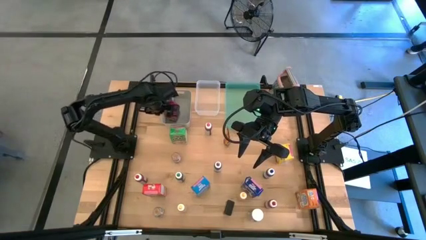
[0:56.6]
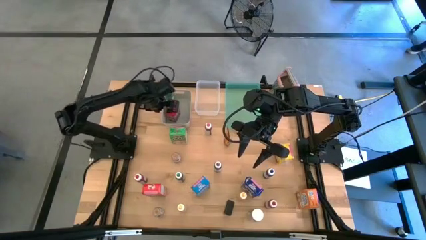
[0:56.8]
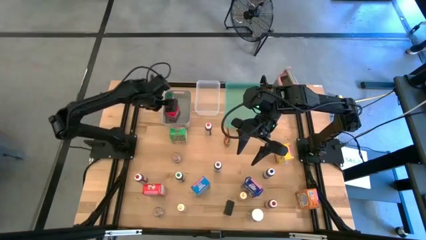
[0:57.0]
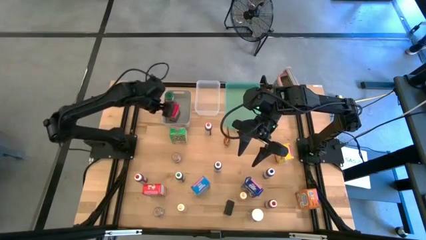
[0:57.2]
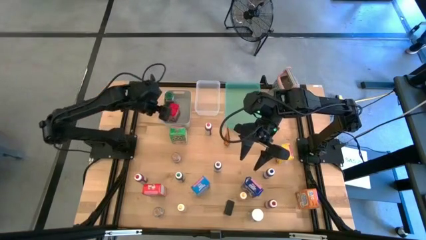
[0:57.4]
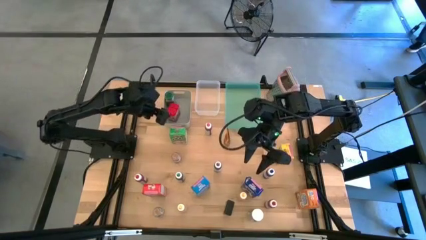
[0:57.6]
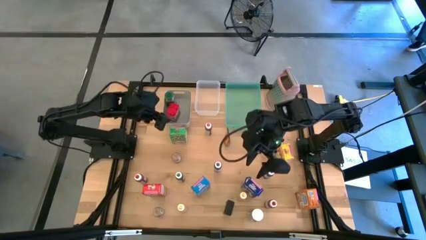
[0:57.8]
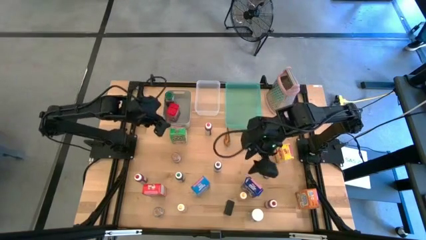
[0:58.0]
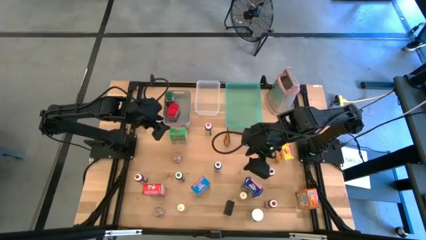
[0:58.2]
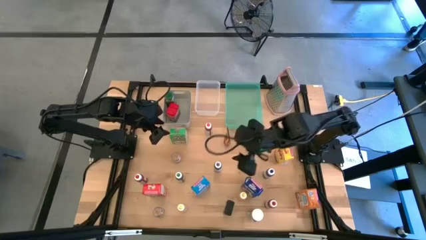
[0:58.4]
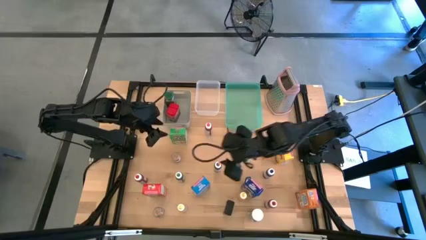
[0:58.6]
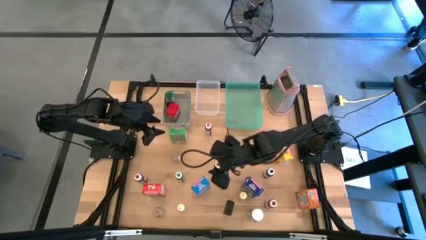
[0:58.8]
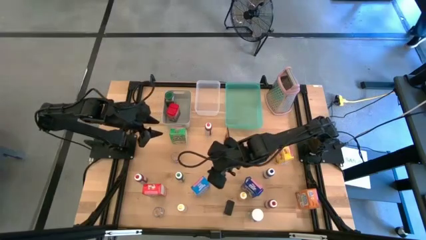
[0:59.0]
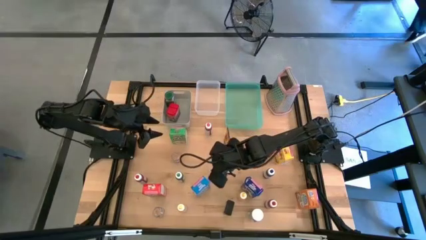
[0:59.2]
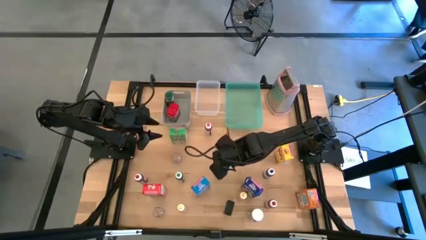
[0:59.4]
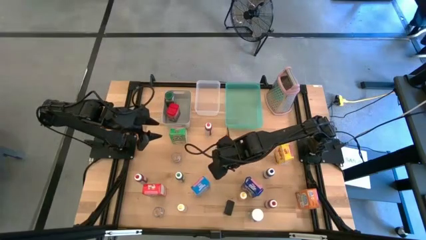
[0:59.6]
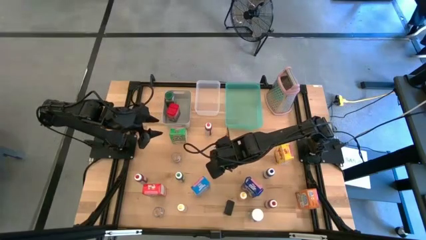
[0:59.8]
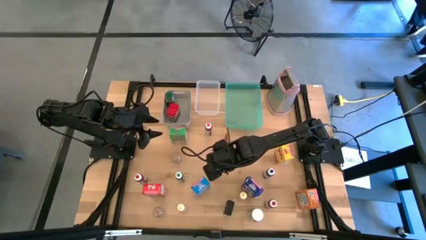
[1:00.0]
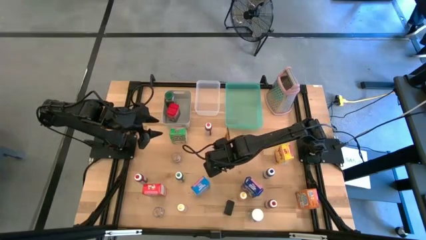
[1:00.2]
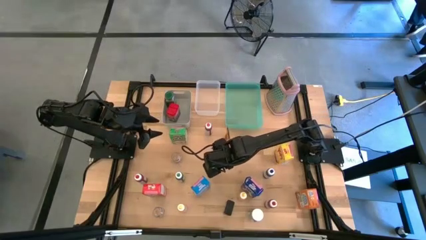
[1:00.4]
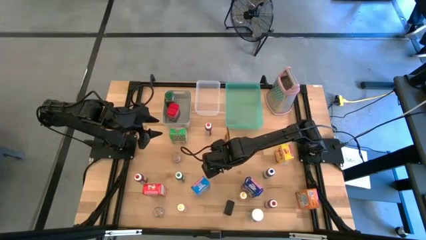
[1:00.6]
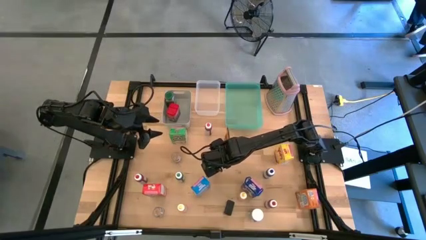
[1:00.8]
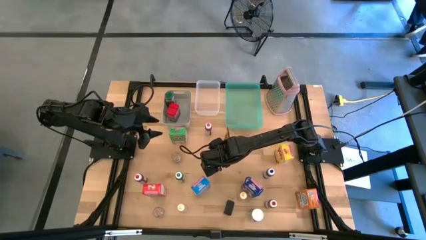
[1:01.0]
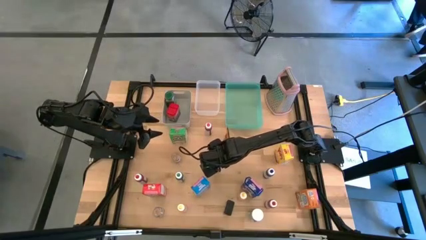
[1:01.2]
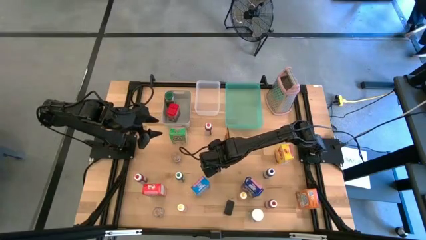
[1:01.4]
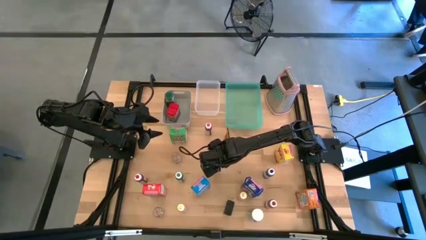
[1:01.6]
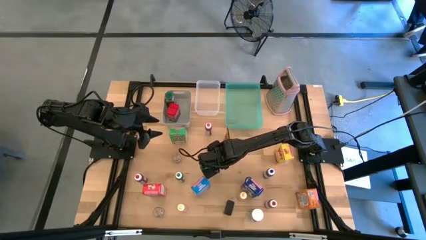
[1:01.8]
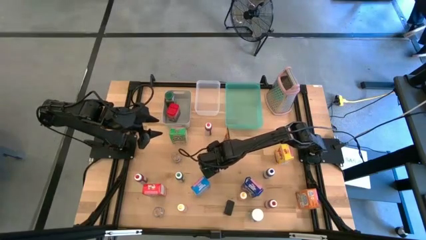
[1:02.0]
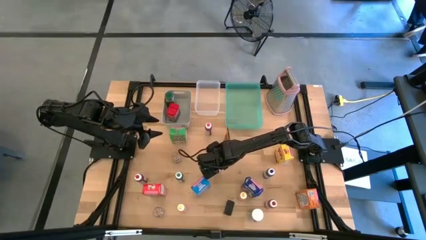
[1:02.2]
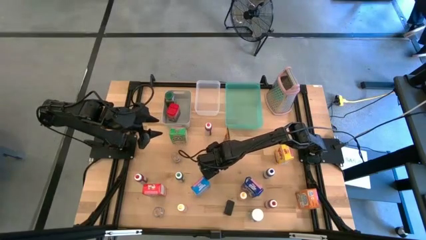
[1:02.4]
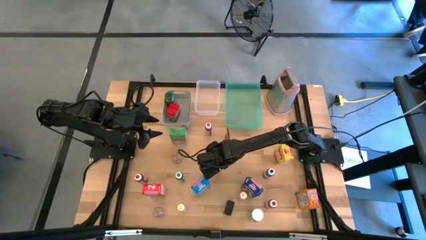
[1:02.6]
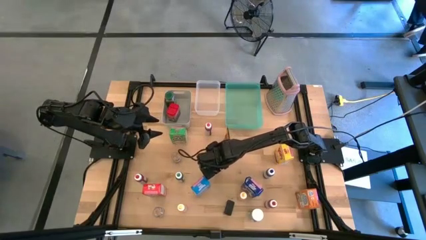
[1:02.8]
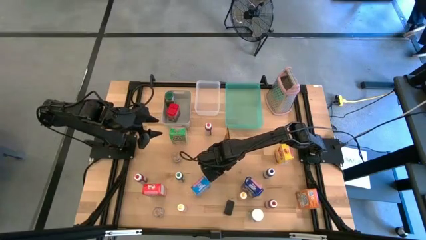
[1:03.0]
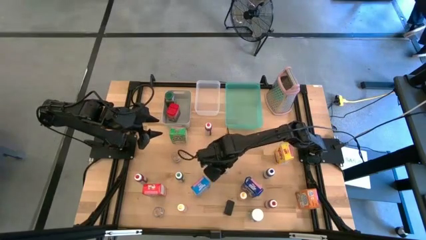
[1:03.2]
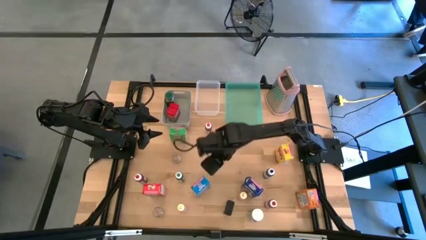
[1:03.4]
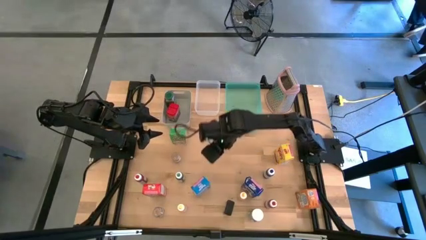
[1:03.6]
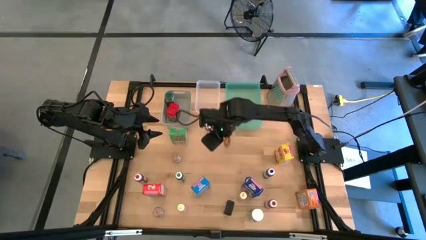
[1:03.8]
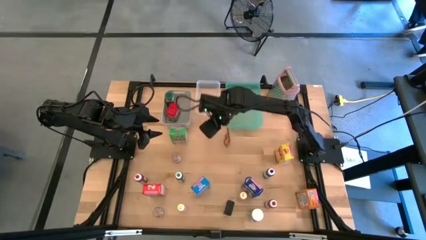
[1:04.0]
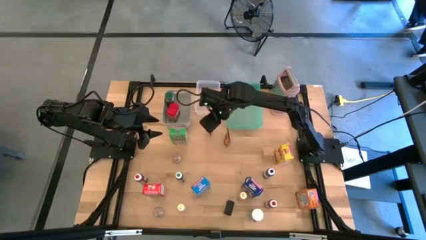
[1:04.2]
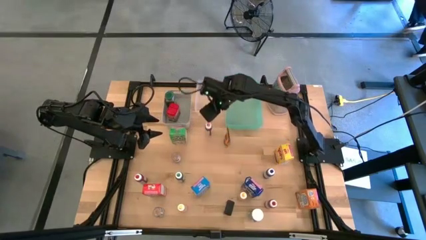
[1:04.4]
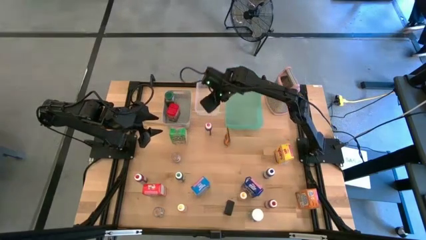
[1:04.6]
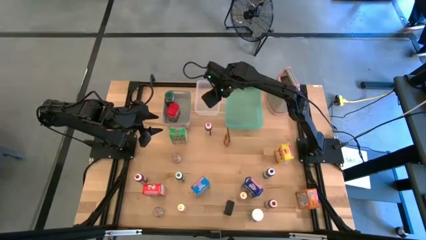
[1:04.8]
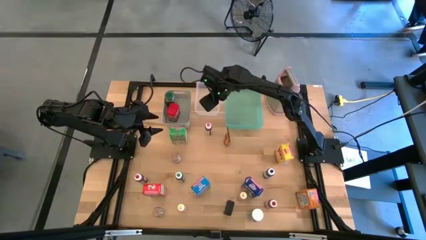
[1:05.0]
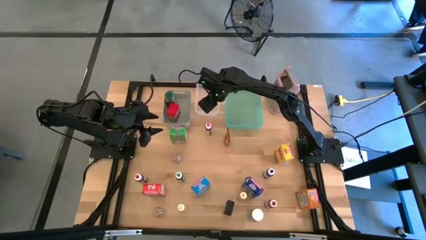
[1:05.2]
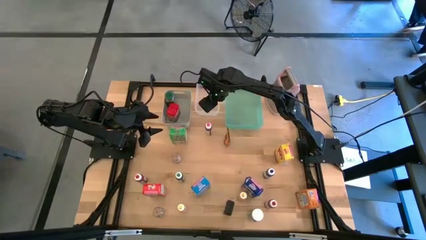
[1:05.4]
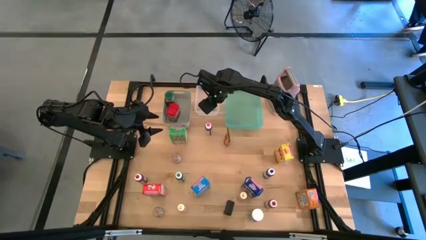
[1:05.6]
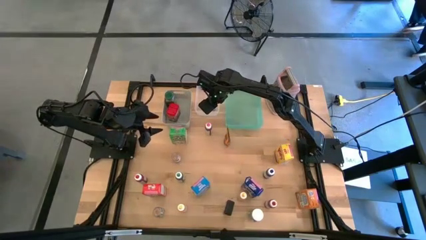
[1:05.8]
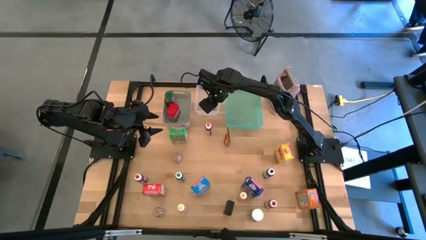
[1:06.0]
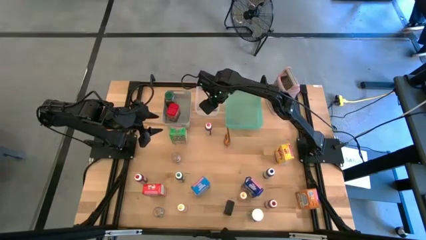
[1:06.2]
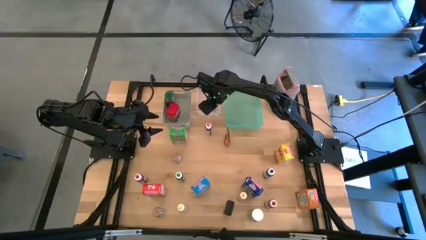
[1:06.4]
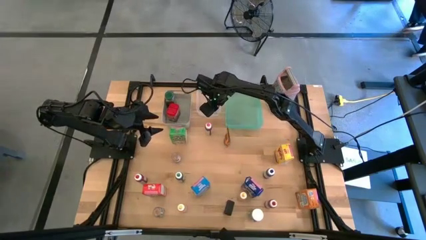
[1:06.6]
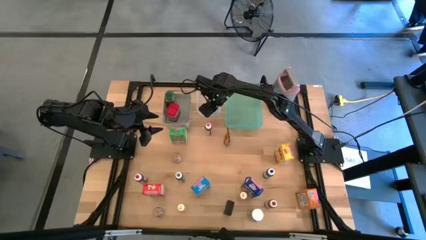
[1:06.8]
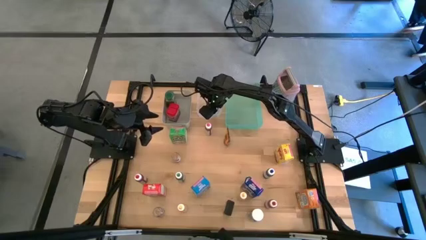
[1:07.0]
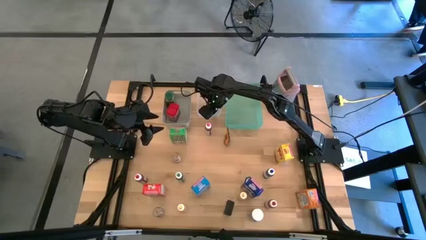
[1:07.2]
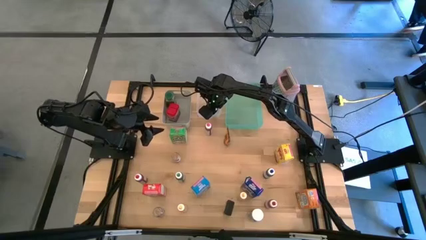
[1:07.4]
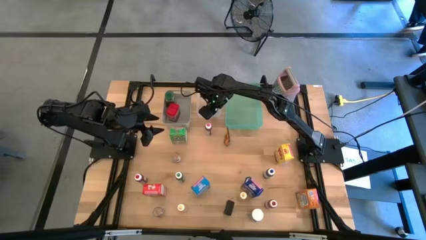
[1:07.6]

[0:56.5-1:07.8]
Task: Pick & Place Kitchen Items
Put the purple food coloring bottle into the transparent bin
